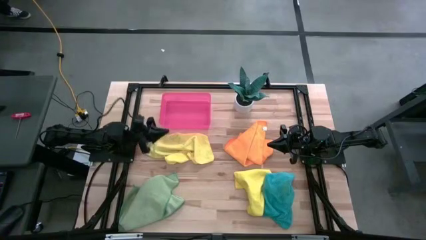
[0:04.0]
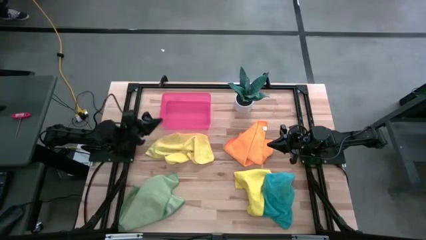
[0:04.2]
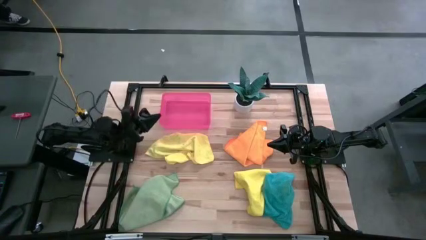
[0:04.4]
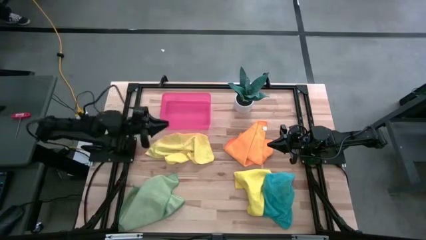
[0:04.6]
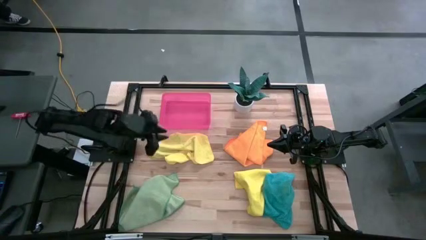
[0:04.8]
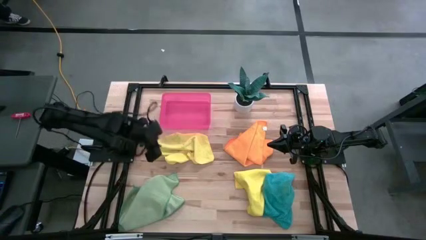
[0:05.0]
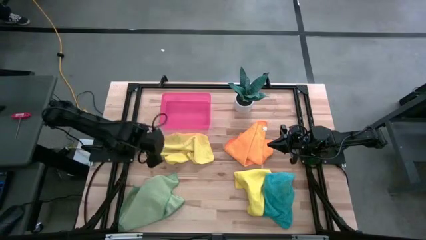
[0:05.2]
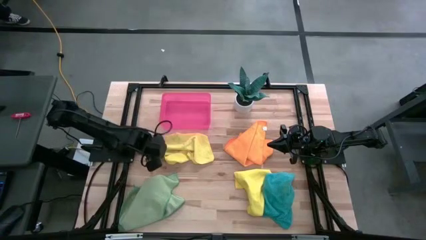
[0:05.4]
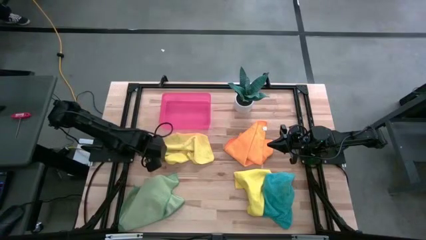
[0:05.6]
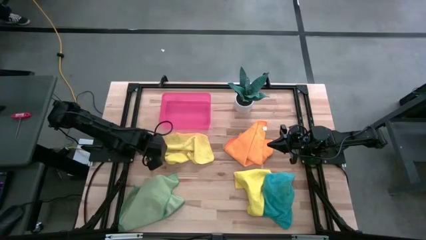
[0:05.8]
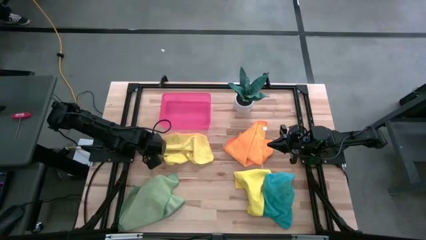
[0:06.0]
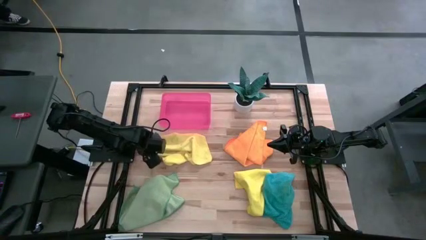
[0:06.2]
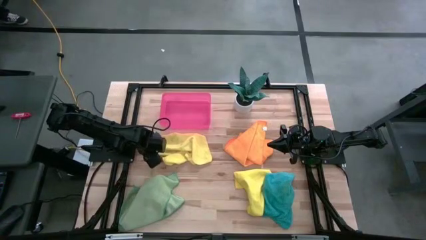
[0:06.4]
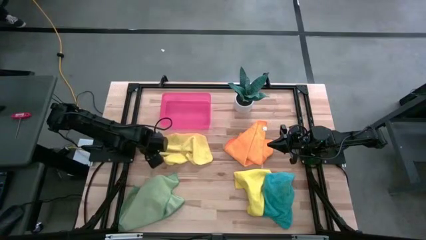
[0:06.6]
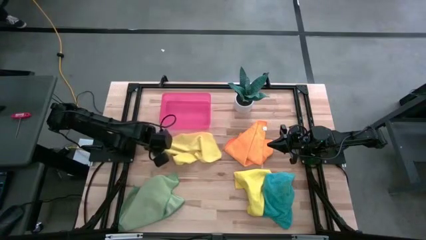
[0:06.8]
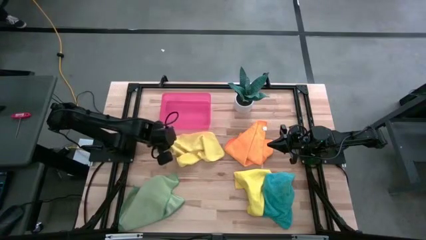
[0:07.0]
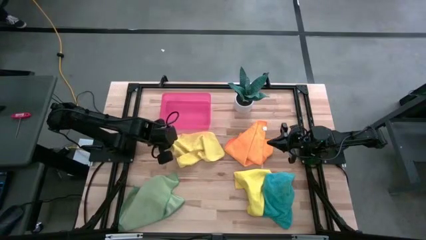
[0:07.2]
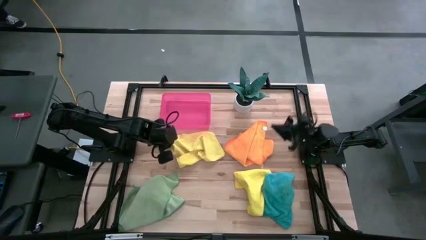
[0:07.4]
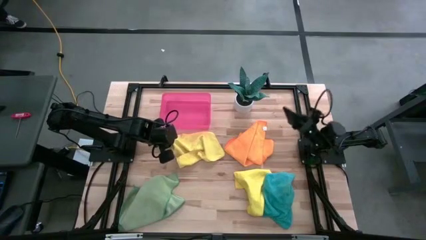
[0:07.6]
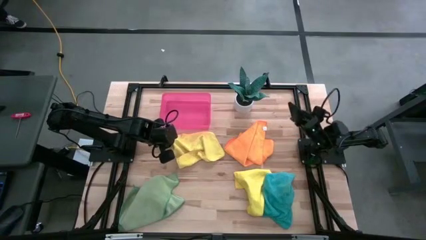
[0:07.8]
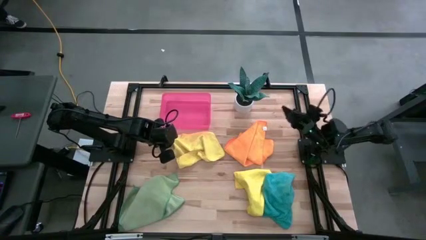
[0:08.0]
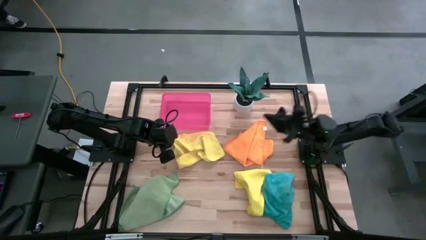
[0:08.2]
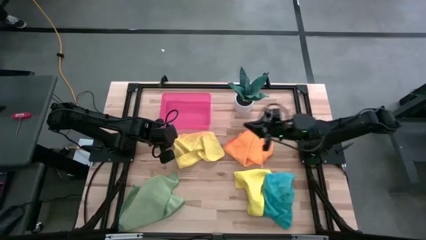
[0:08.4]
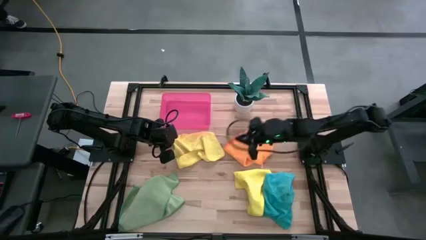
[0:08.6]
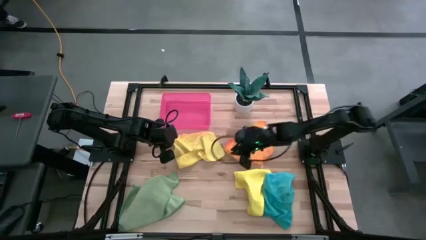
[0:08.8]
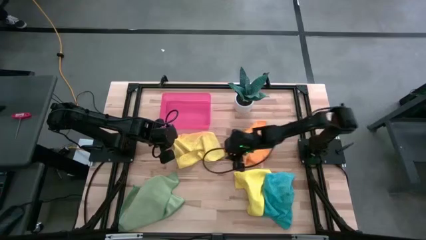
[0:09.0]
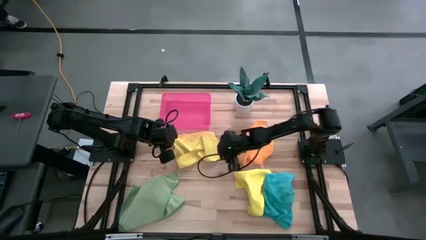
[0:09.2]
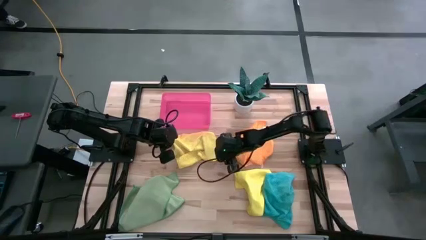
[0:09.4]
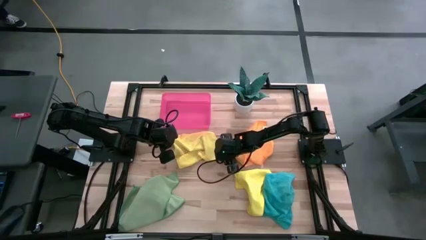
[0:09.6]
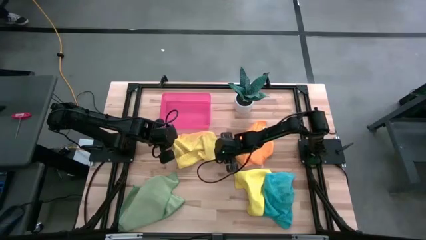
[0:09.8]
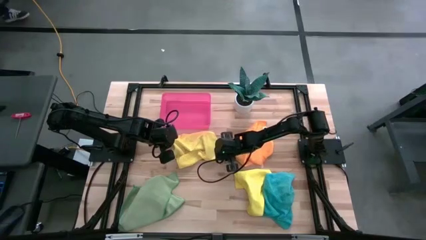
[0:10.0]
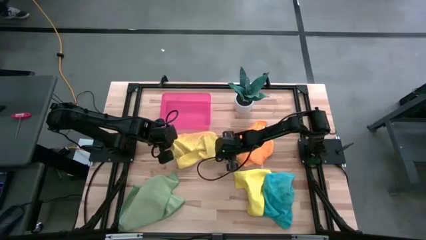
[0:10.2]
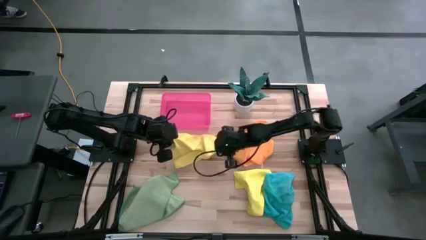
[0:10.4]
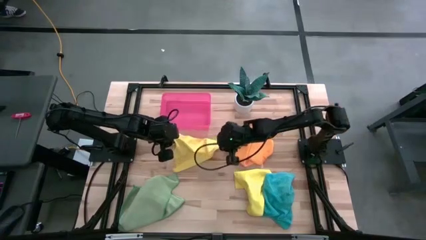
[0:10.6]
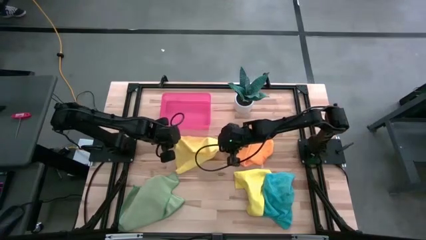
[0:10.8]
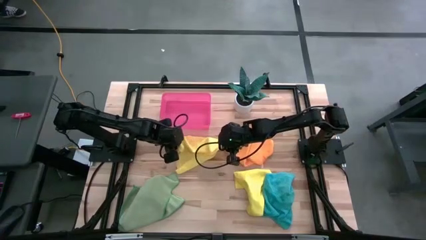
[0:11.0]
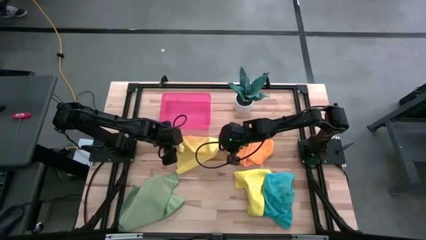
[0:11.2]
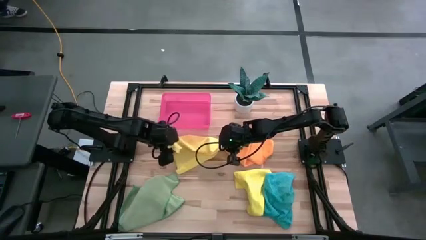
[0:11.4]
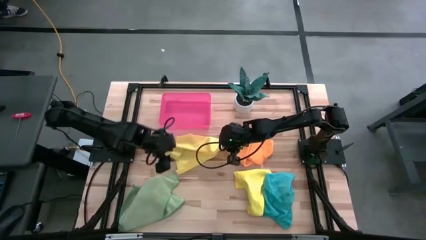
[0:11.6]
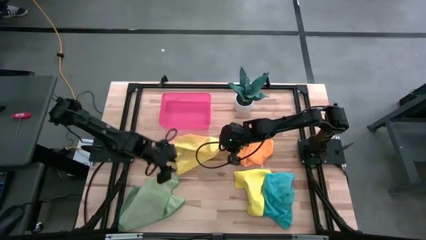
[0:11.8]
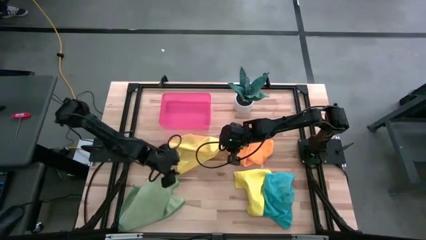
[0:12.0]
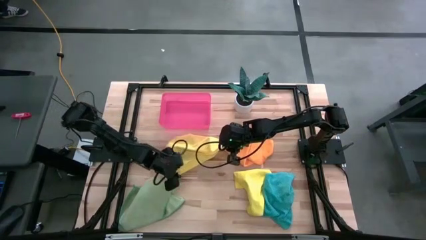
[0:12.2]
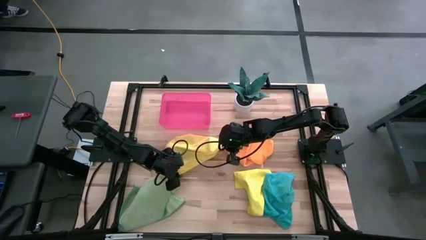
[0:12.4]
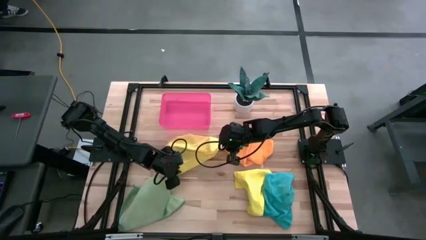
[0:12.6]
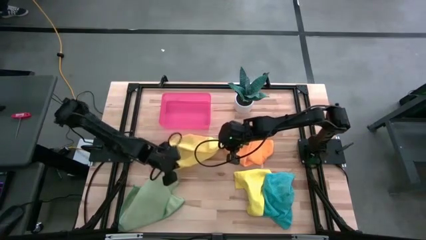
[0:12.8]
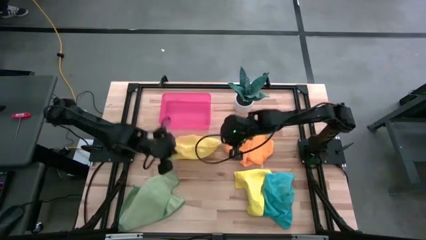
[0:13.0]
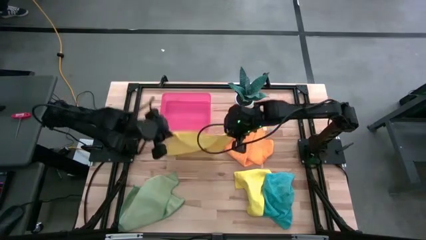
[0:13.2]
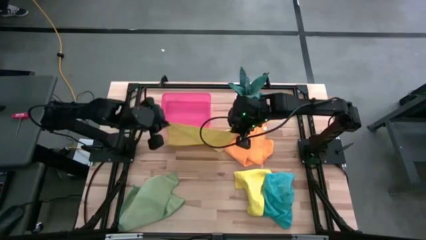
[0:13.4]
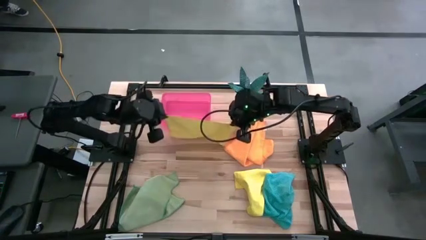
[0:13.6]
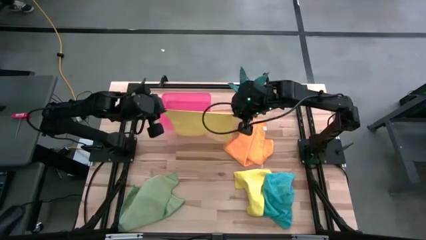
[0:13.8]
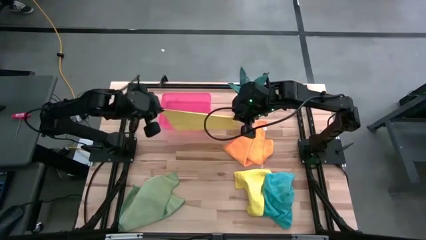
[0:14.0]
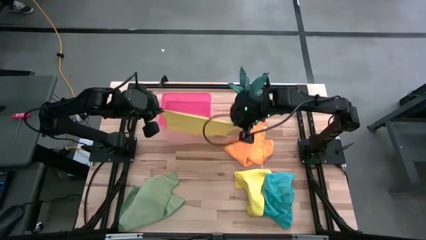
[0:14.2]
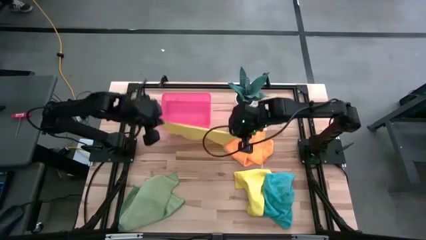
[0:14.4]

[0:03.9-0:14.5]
Task: Fold microfiber towels
Fold the top yellow microfiber towel

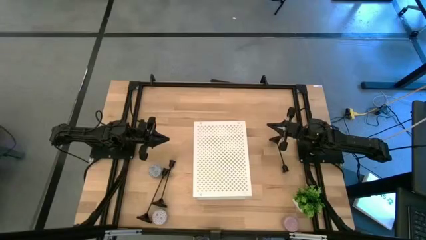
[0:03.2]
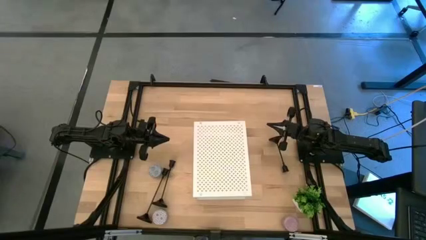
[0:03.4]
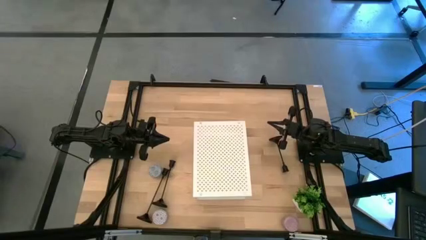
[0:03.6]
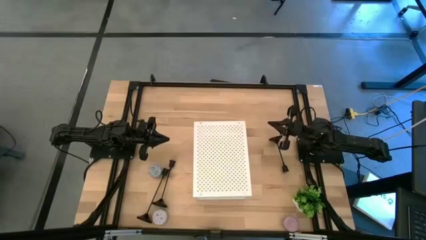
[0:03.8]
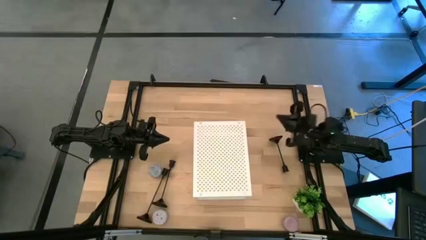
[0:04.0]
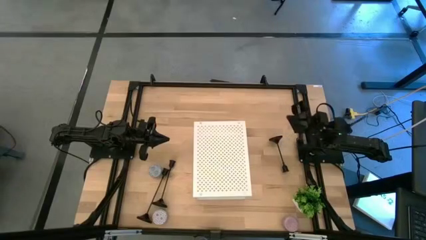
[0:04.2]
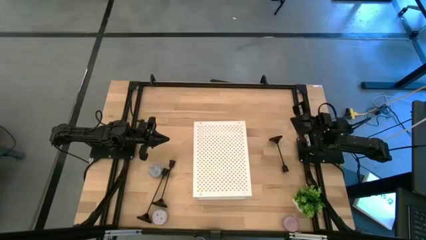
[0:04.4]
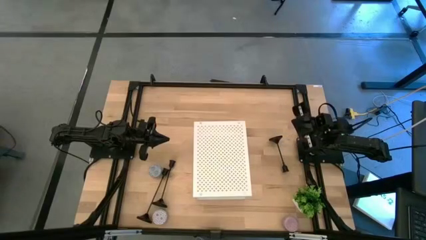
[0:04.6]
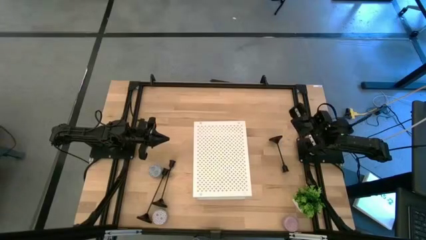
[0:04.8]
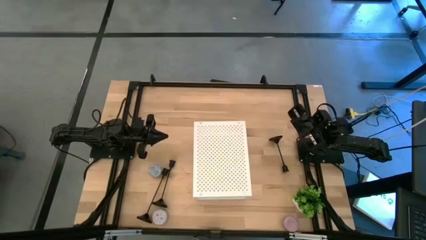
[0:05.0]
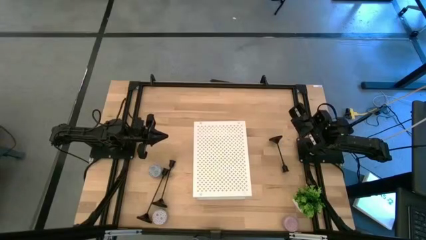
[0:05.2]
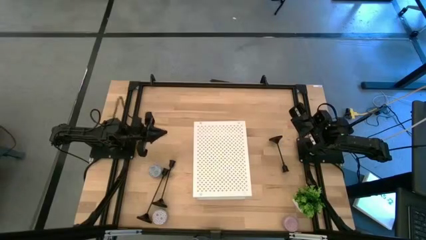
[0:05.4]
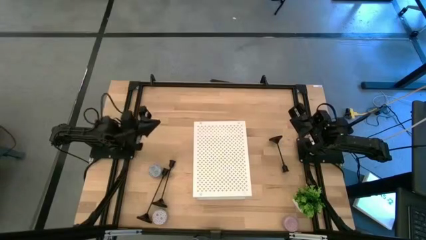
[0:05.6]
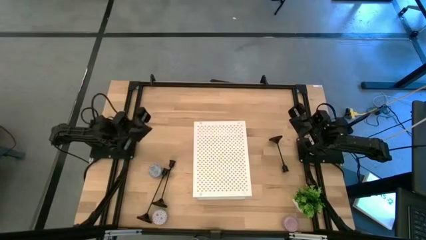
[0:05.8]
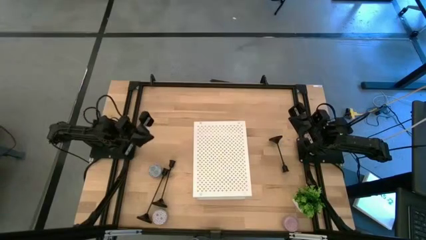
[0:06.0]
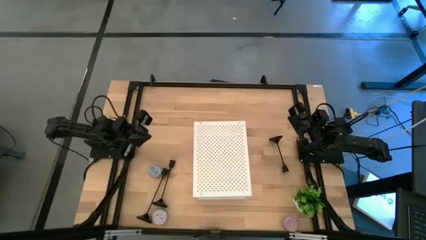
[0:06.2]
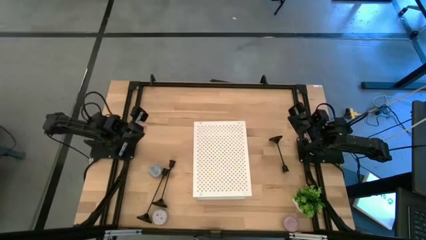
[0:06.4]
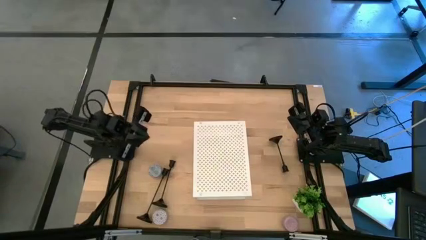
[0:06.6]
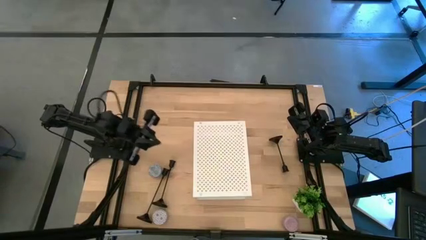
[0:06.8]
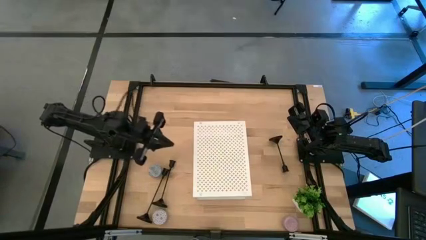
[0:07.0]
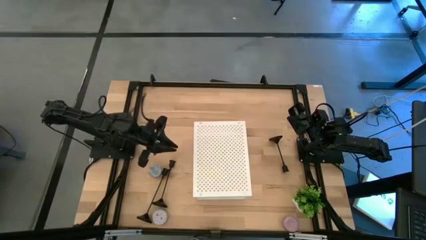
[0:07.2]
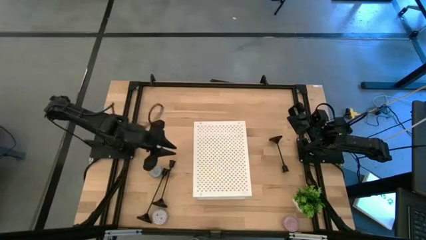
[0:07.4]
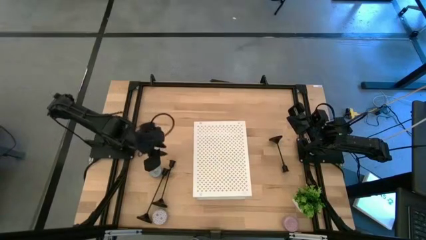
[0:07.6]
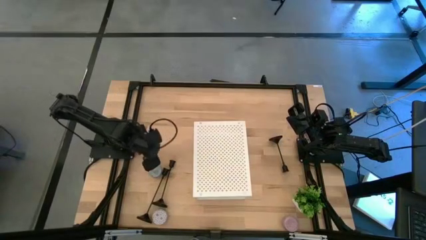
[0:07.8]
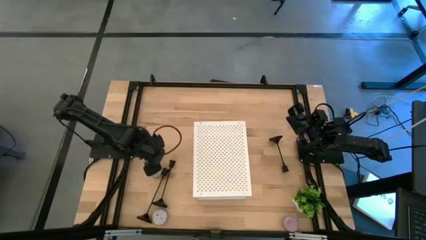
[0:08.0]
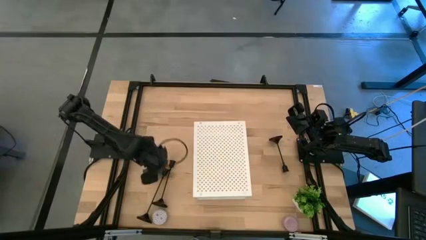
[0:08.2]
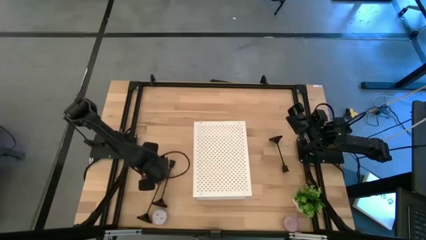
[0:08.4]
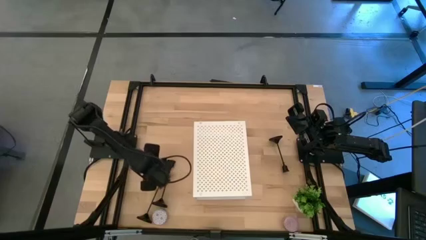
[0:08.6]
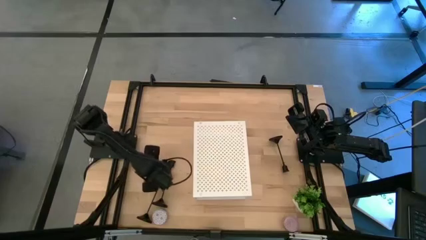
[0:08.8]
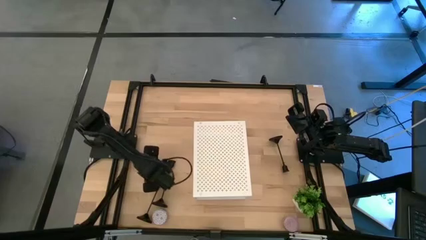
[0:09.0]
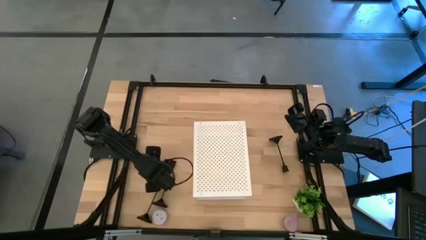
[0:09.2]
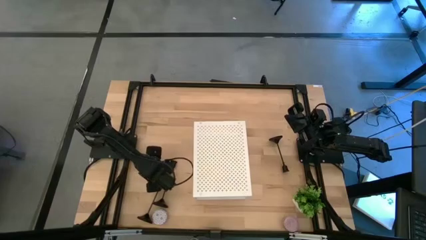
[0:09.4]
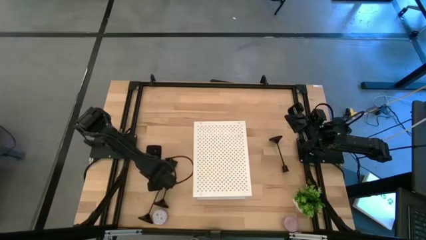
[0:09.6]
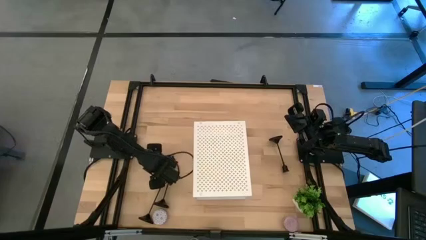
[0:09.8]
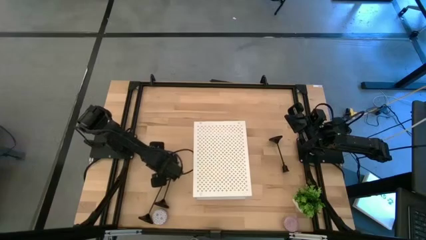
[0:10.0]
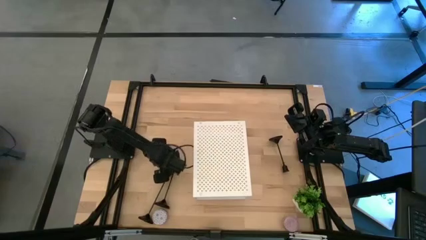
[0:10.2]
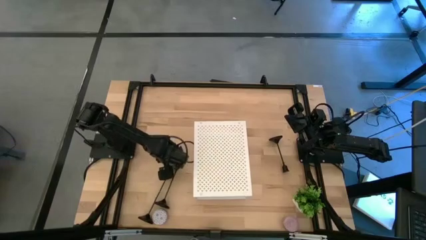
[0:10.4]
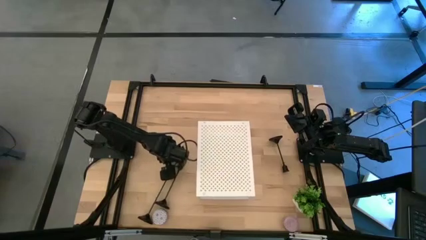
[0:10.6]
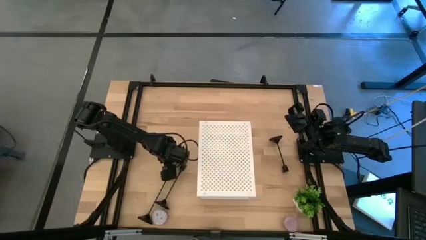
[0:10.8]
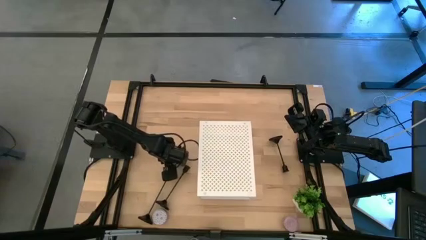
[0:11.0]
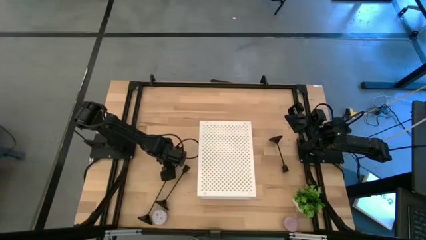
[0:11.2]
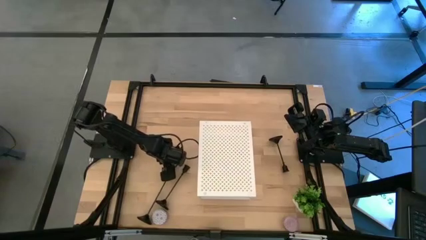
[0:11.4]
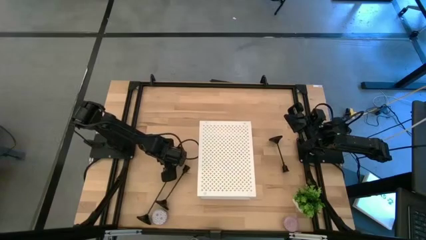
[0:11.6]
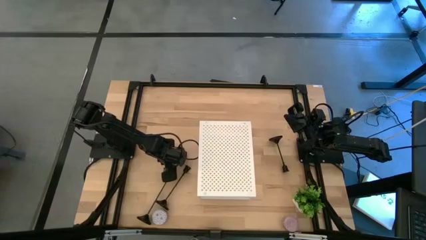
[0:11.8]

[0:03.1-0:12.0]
Task: Pick & Place candle stick holders
Put the blue scented candle on the shelf
